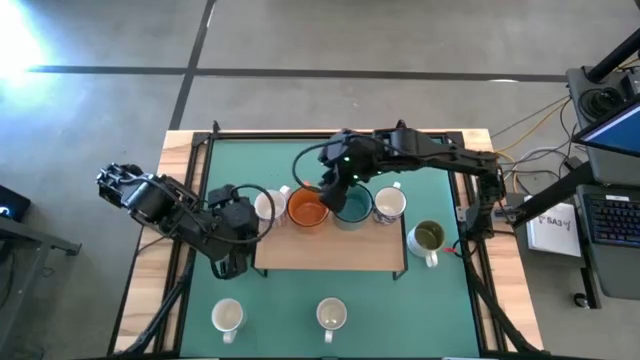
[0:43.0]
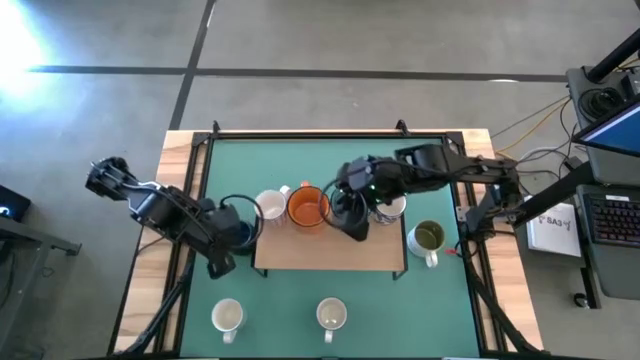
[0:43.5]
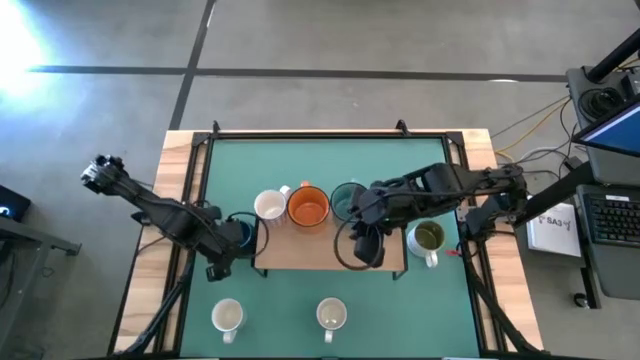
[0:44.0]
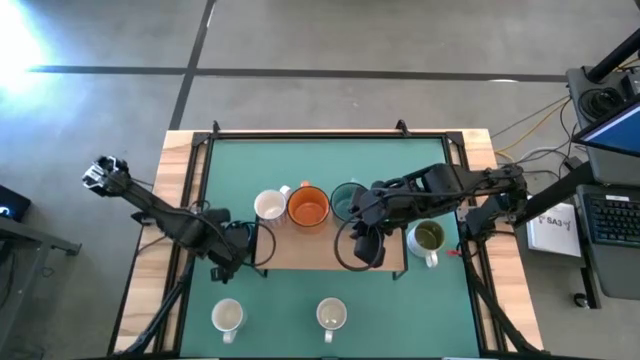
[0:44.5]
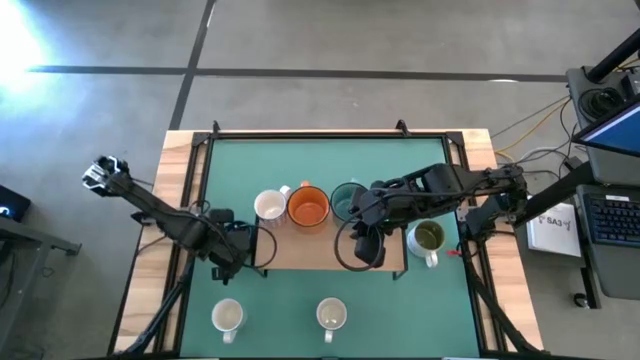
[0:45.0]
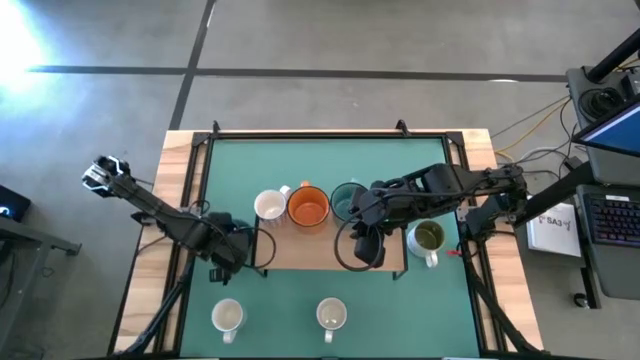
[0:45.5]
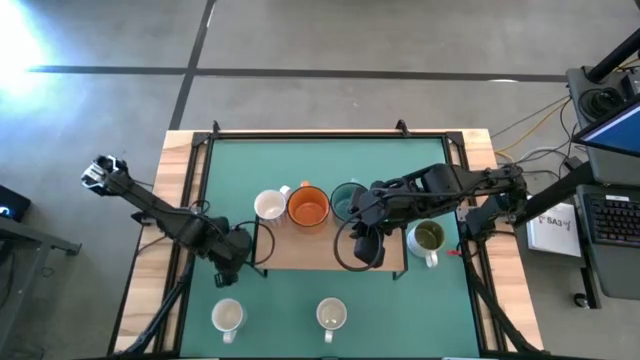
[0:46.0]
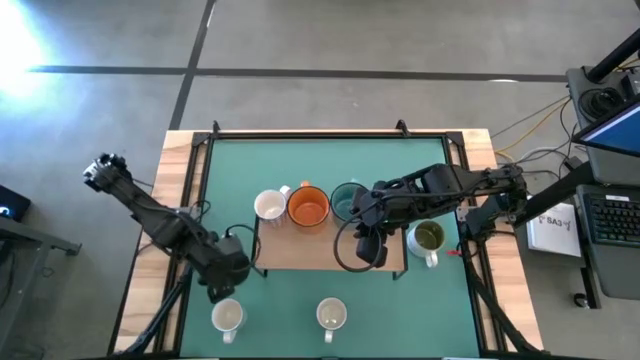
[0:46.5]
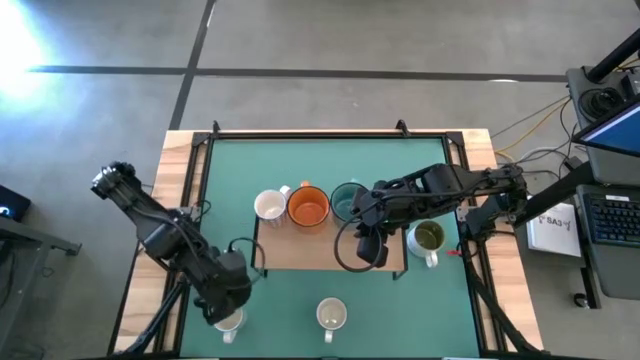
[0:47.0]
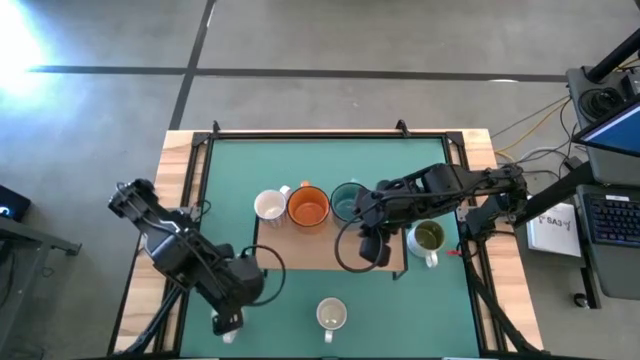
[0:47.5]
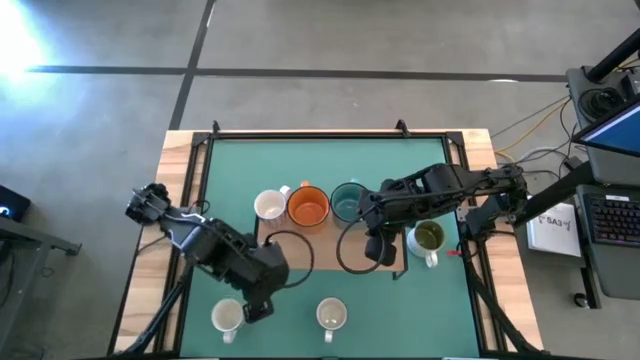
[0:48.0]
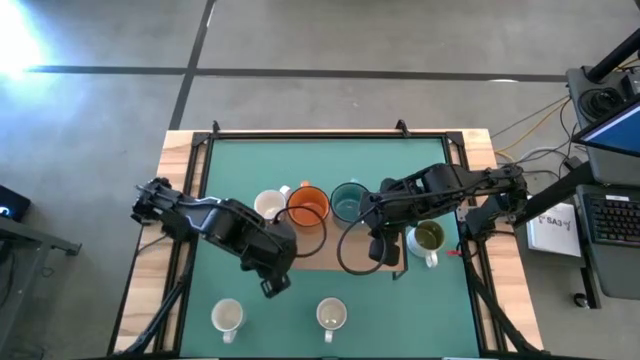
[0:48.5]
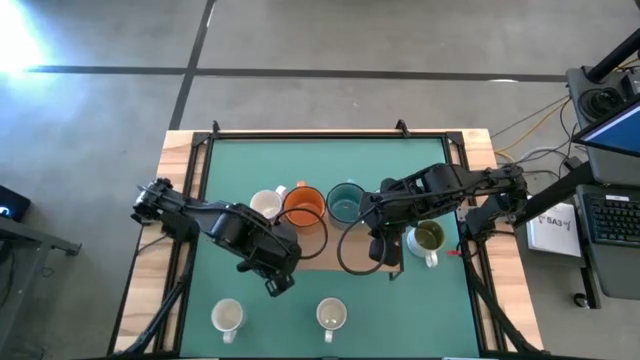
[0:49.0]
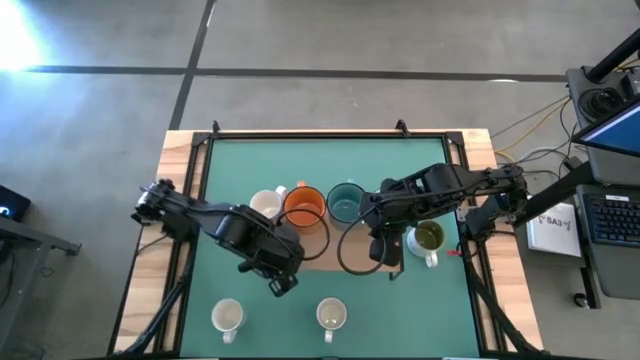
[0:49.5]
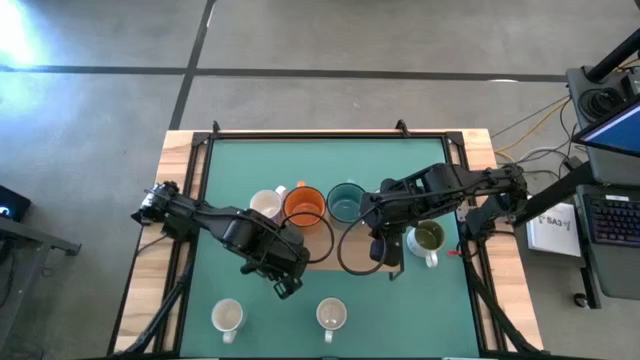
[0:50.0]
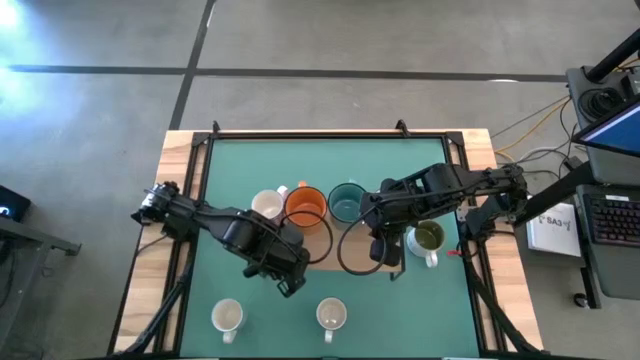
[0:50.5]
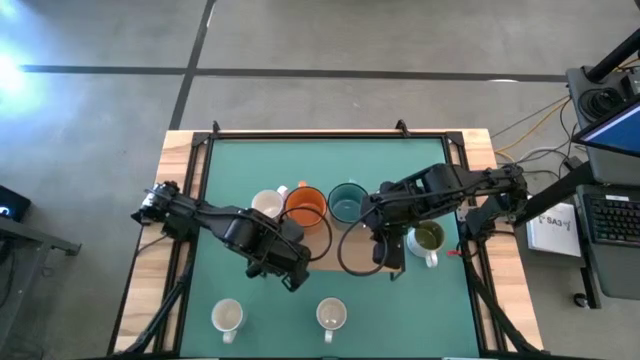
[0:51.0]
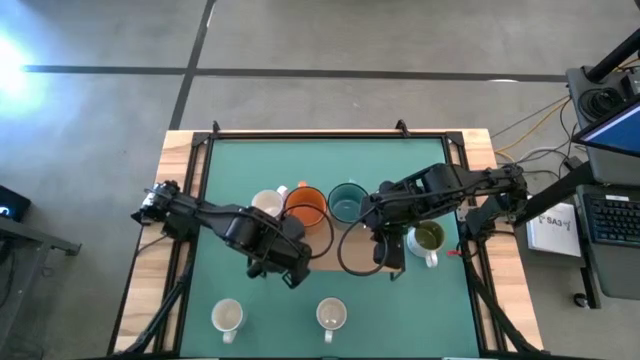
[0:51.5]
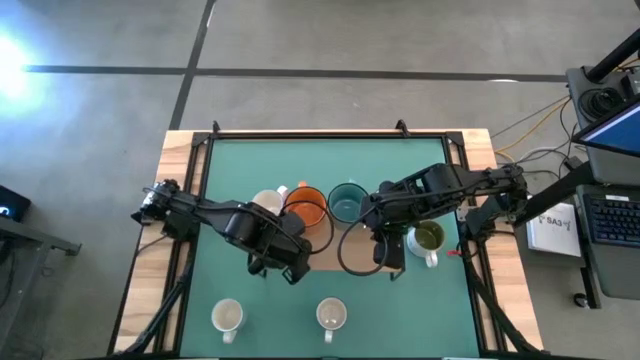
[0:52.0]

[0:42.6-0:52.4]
Task: Place coffee mugs
Put the black mug on the shelf

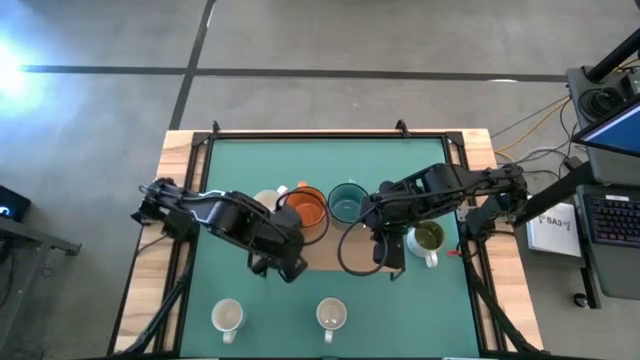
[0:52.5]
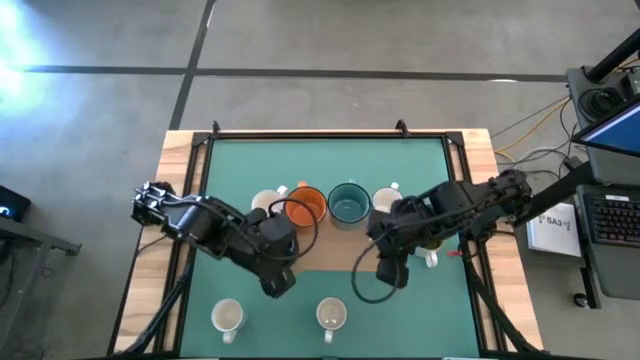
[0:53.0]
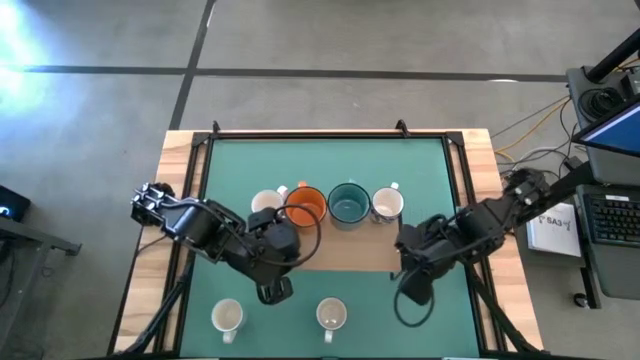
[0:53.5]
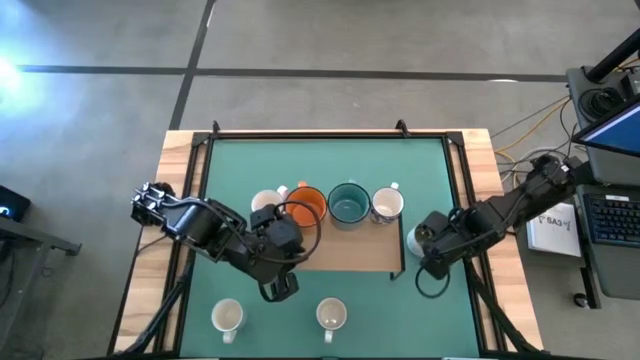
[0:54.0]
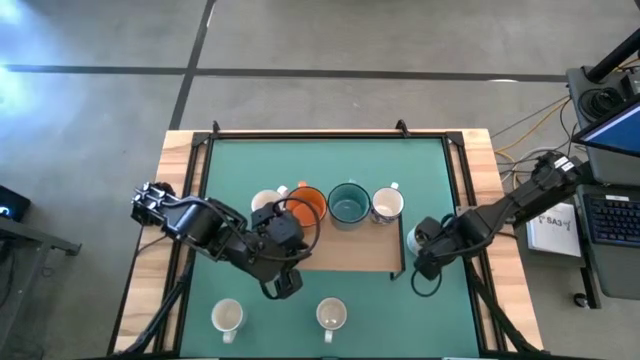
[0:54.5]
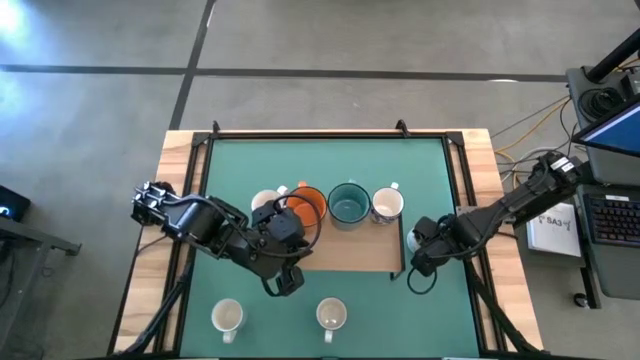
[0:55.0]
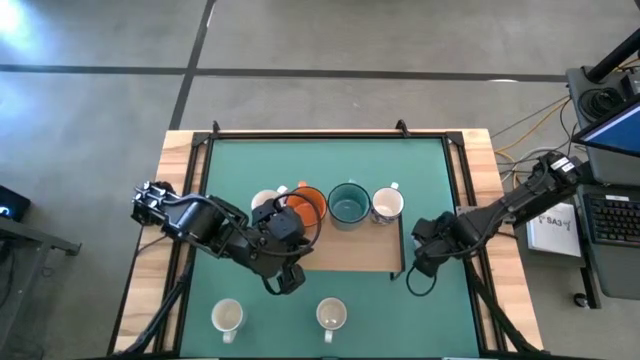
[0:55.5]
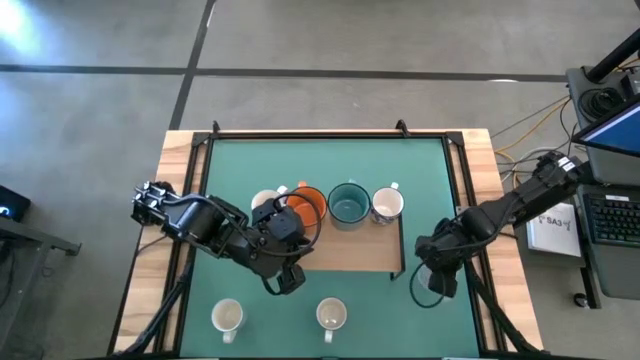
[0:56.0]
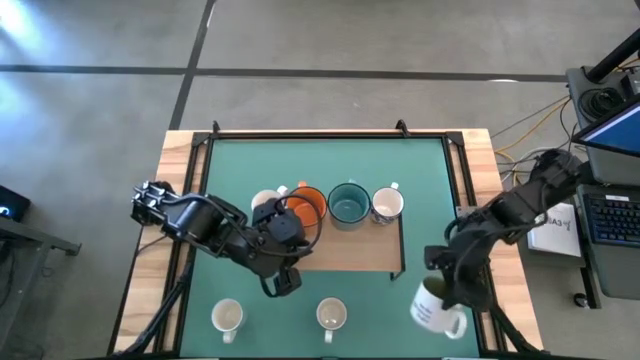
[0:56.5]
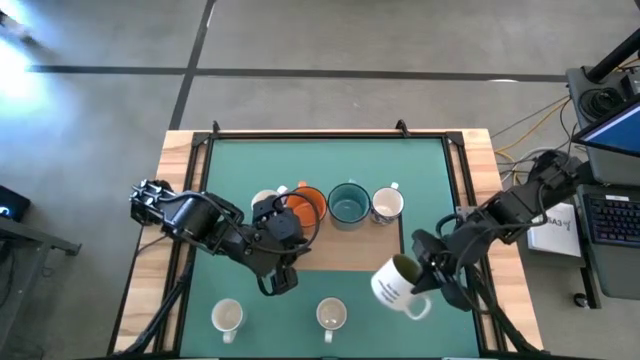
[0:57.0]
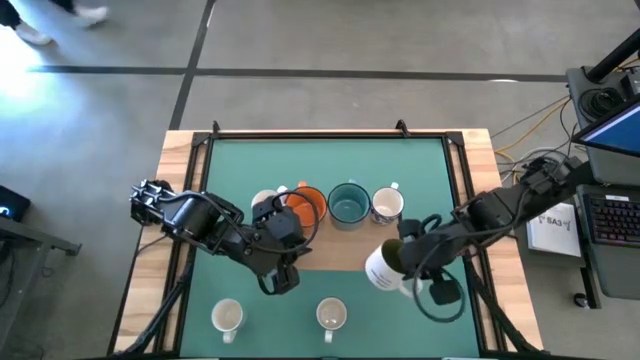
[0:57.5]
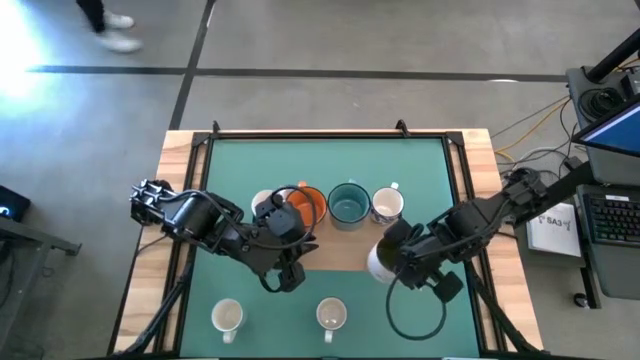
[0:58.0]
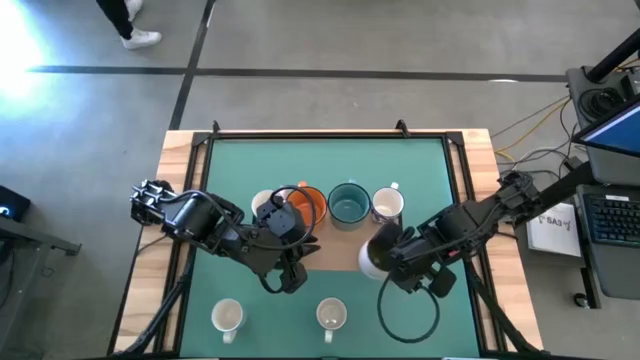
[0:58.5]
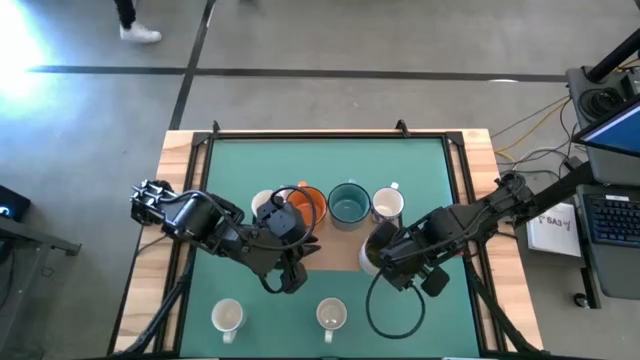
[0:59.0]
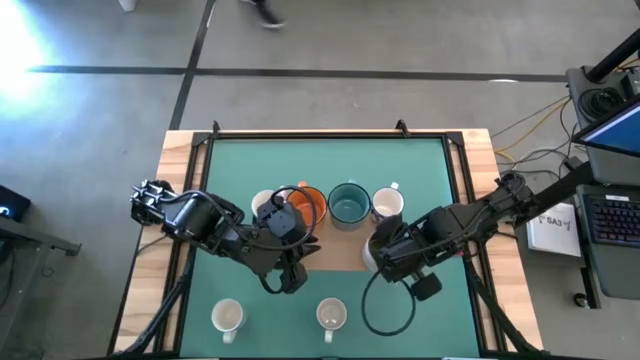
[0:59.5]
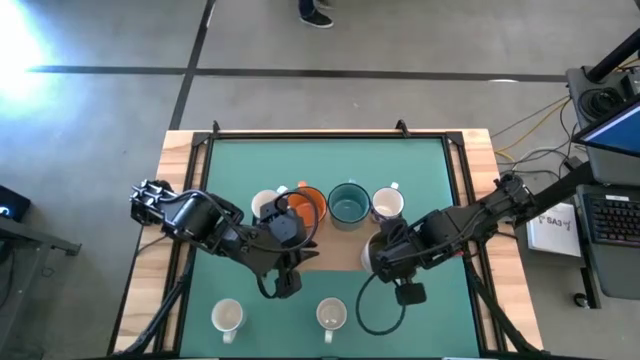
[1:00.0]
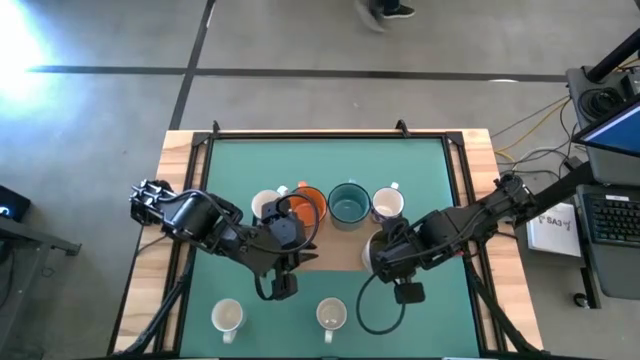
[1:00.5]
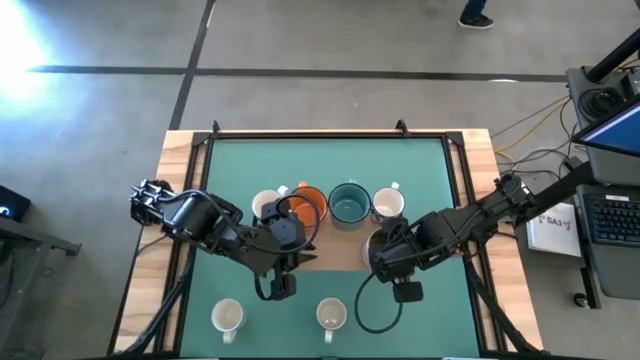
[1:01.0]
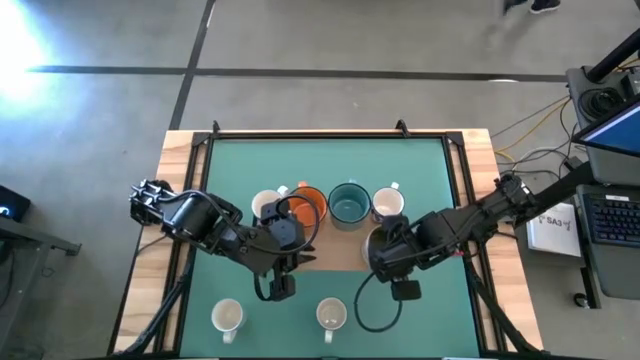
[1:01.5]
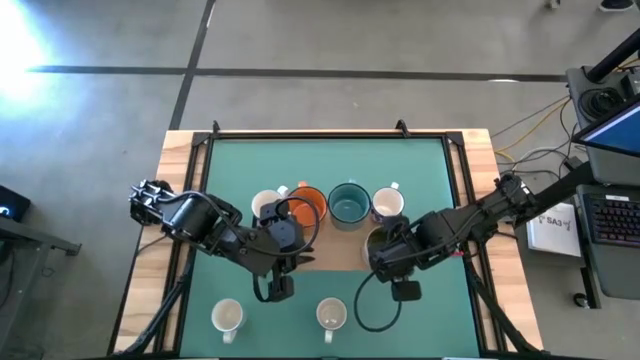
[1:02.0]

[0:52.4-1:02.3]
Put the white green mug on the shelf

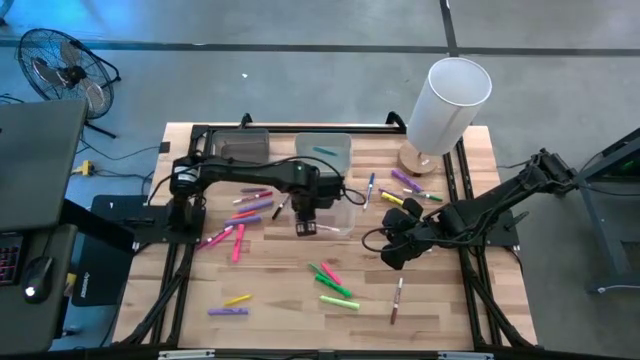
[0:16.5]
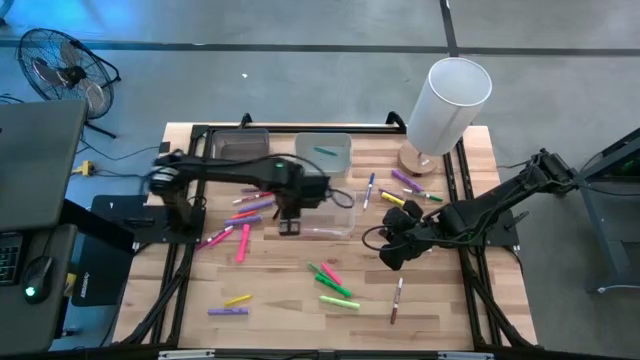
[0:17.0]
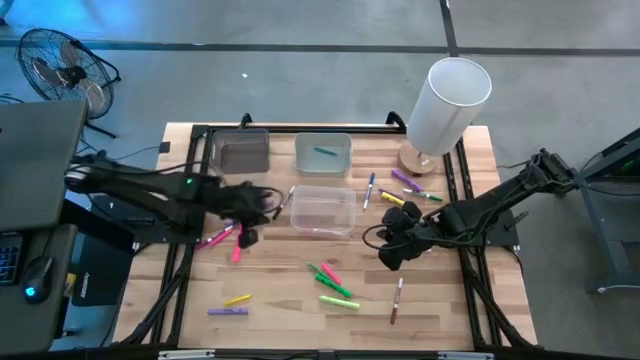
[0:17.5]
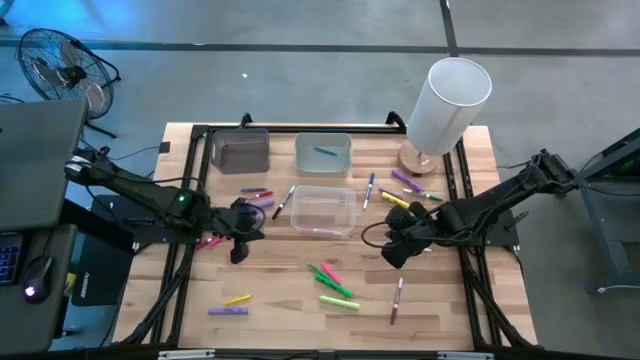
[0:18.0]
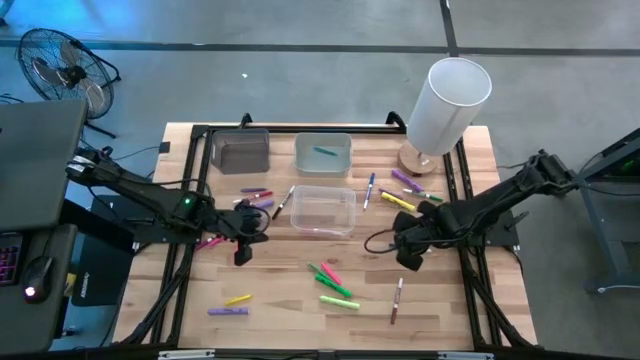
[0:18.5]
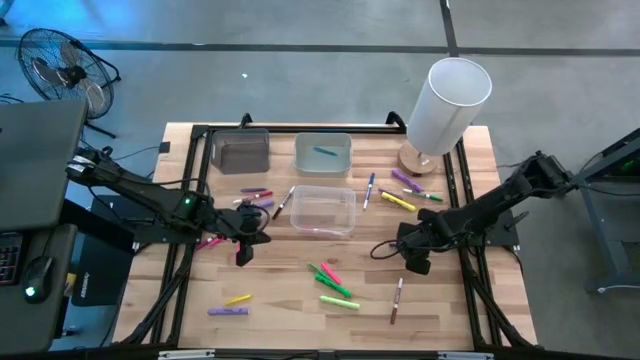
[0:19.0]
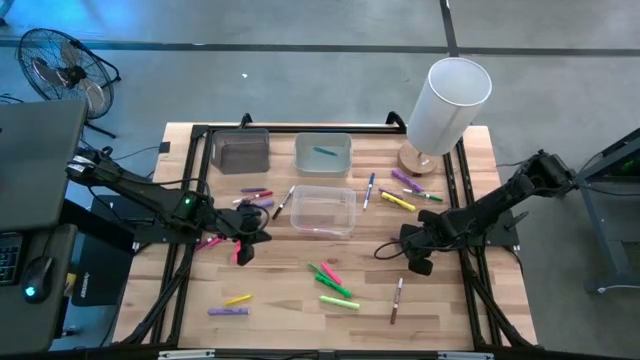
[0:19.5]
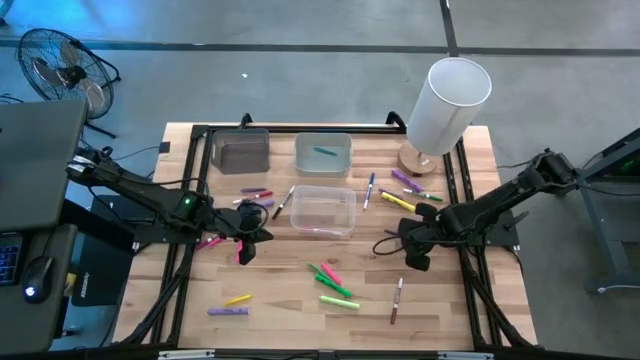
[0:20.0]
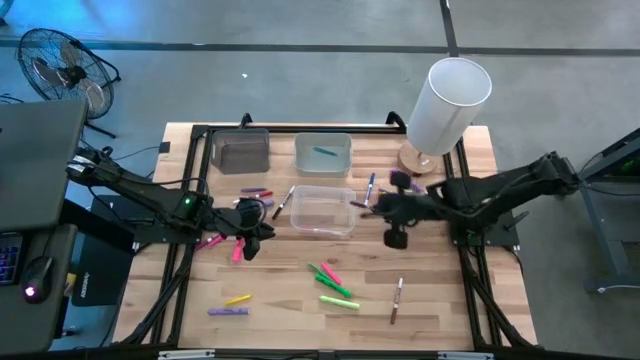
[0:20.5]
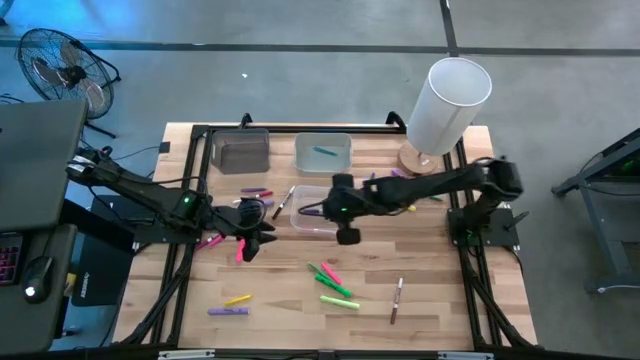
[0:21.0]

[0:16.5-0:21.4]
Task: Pick & Place Markers
Put the bottom blue marker into the white bin
